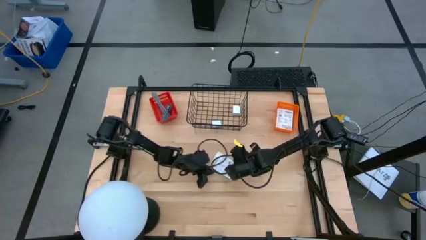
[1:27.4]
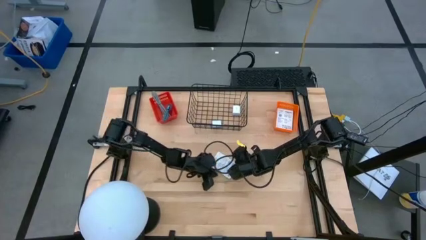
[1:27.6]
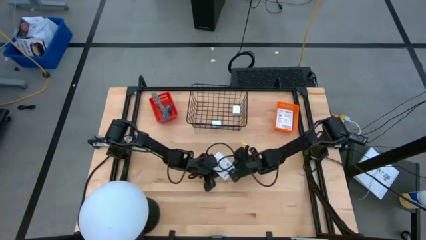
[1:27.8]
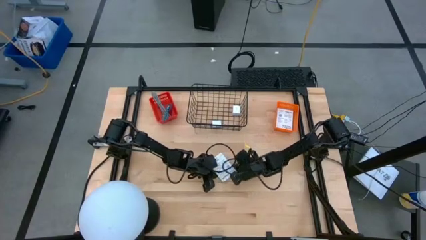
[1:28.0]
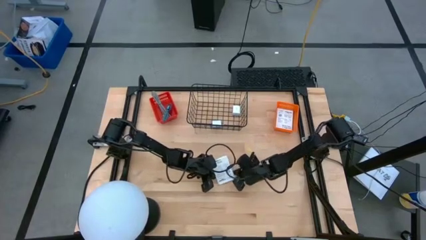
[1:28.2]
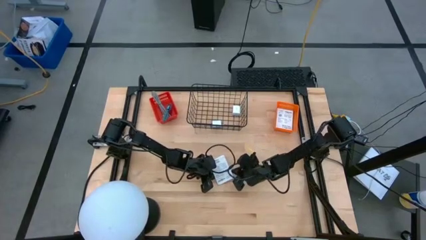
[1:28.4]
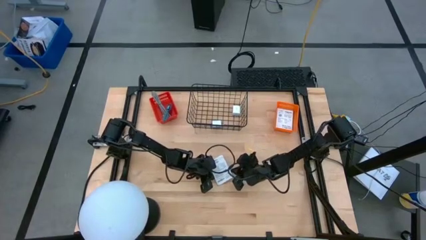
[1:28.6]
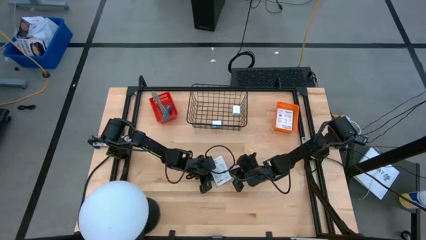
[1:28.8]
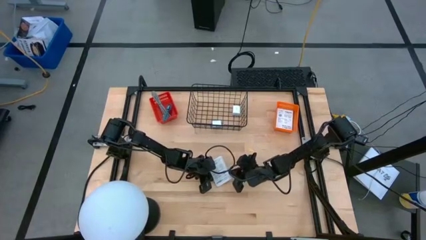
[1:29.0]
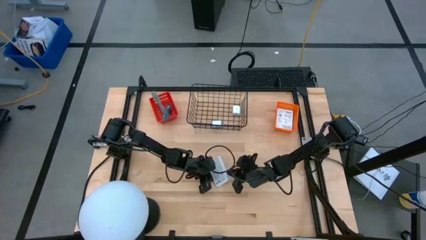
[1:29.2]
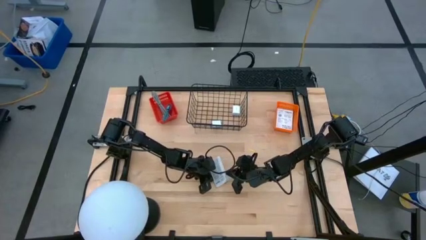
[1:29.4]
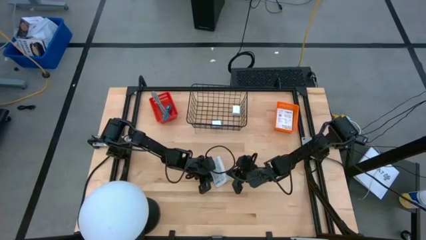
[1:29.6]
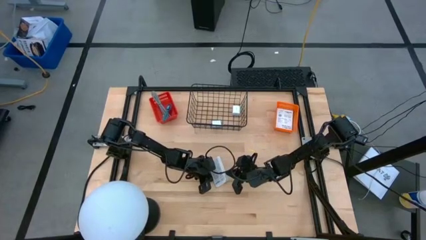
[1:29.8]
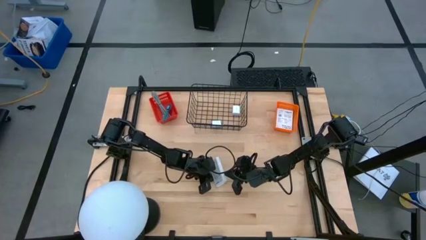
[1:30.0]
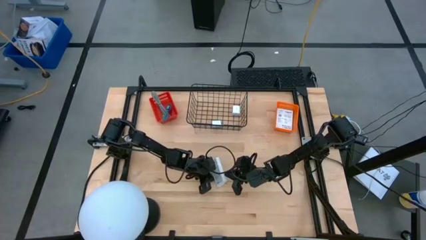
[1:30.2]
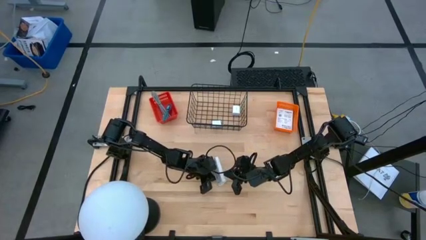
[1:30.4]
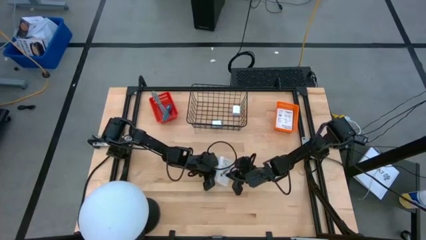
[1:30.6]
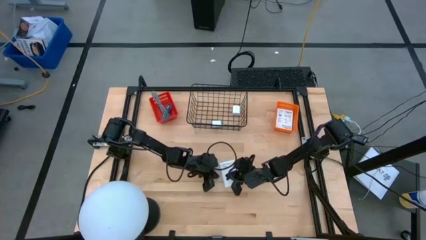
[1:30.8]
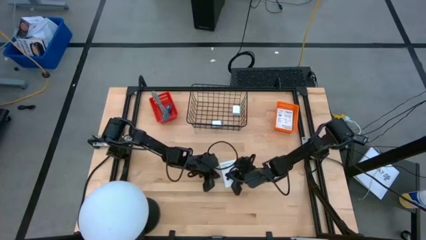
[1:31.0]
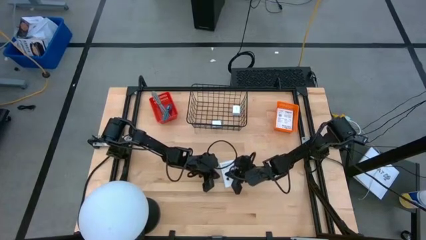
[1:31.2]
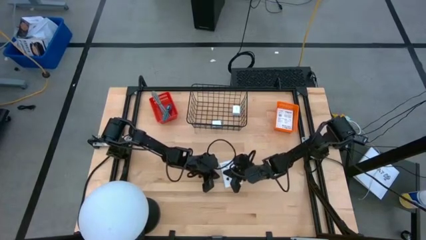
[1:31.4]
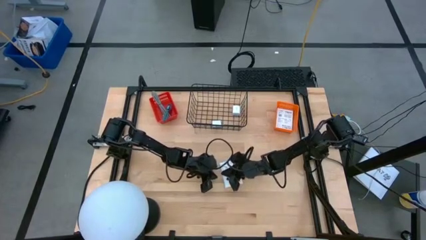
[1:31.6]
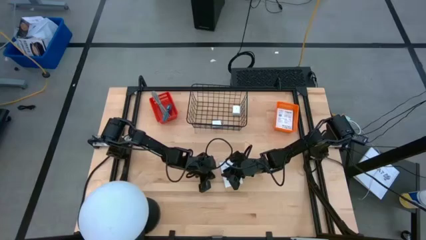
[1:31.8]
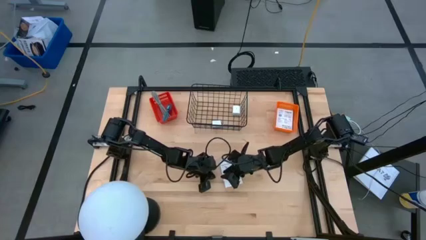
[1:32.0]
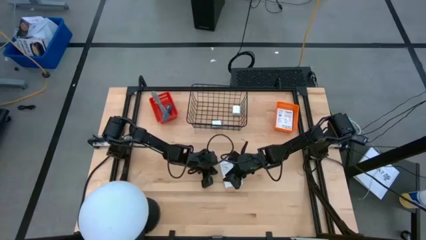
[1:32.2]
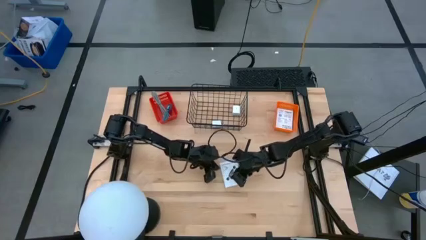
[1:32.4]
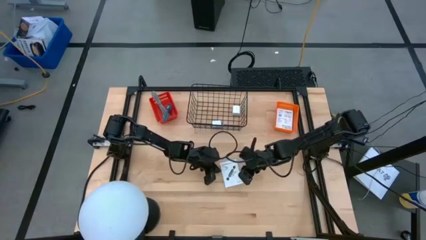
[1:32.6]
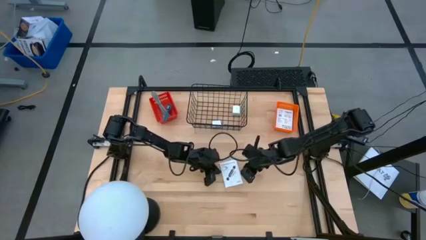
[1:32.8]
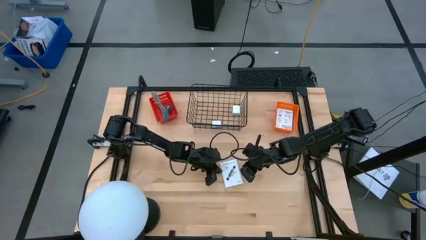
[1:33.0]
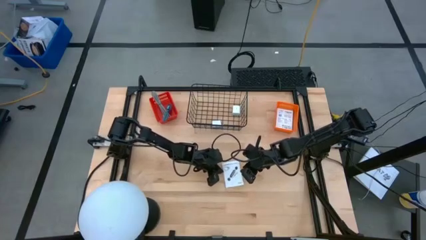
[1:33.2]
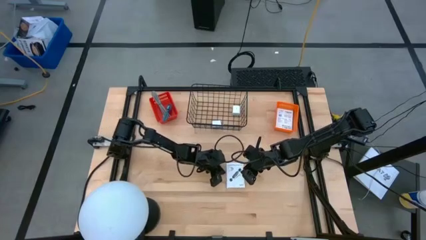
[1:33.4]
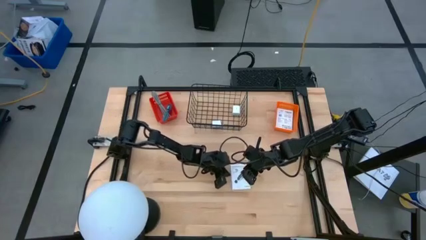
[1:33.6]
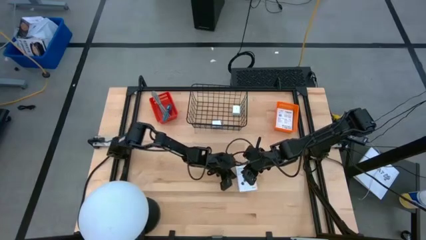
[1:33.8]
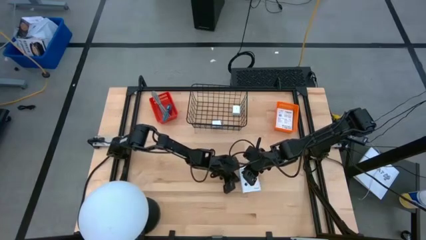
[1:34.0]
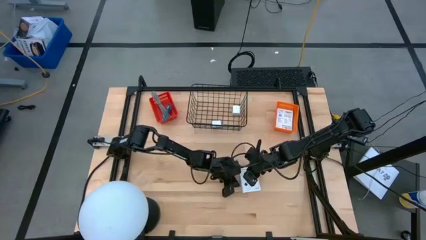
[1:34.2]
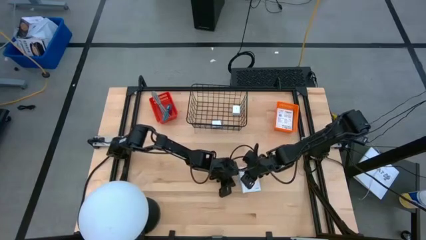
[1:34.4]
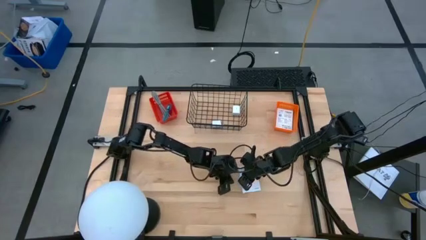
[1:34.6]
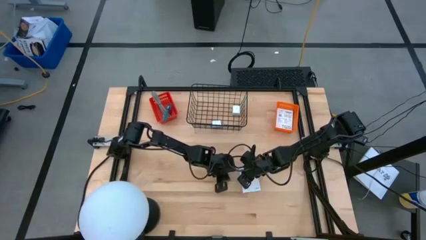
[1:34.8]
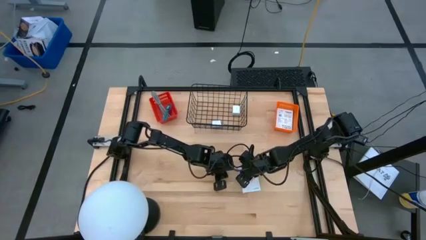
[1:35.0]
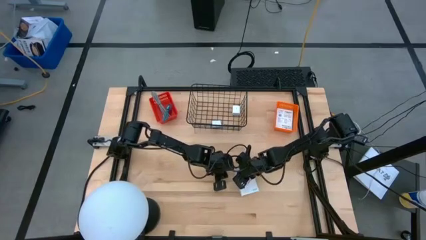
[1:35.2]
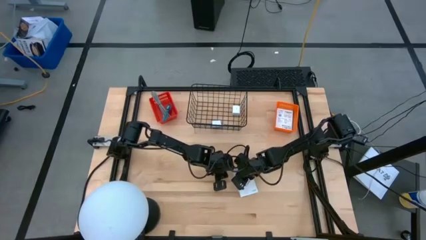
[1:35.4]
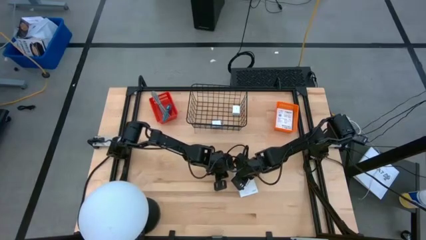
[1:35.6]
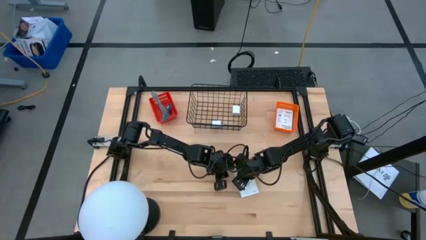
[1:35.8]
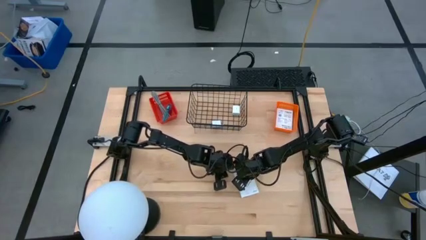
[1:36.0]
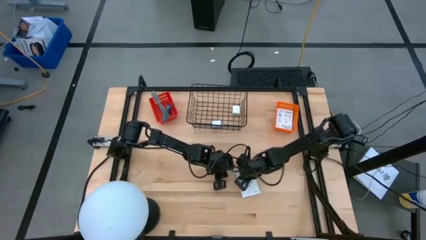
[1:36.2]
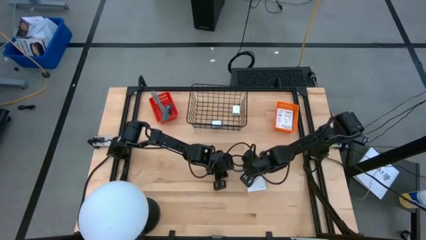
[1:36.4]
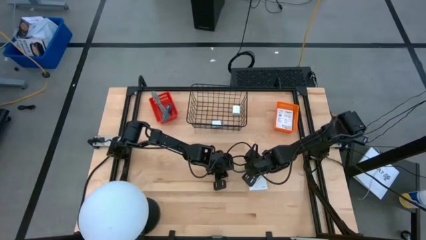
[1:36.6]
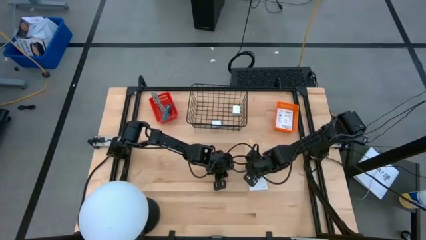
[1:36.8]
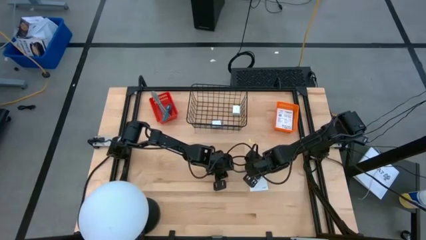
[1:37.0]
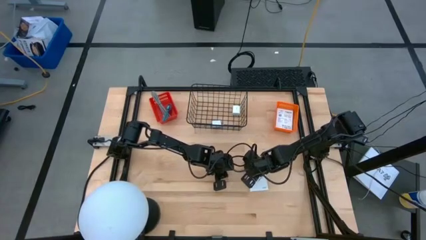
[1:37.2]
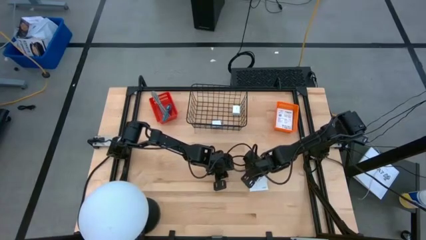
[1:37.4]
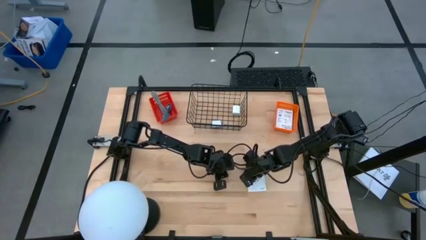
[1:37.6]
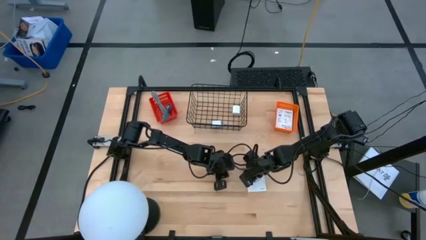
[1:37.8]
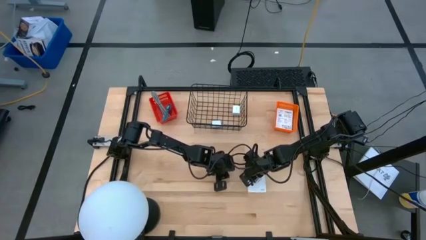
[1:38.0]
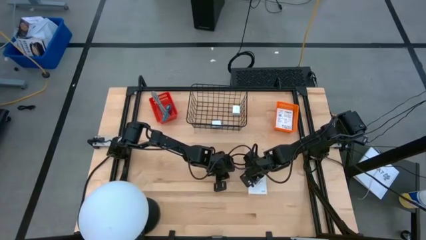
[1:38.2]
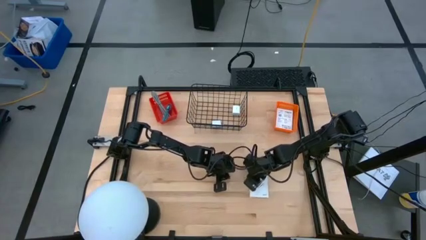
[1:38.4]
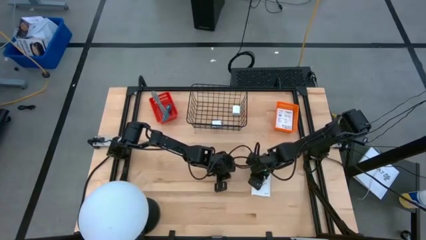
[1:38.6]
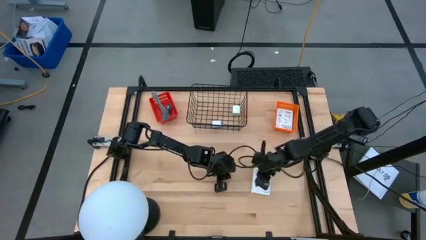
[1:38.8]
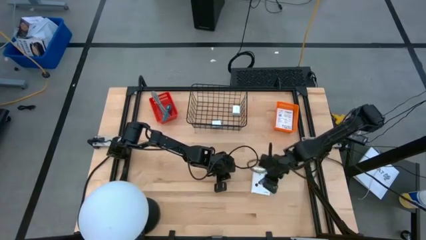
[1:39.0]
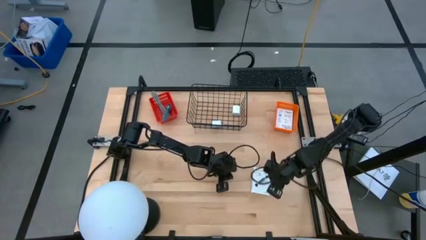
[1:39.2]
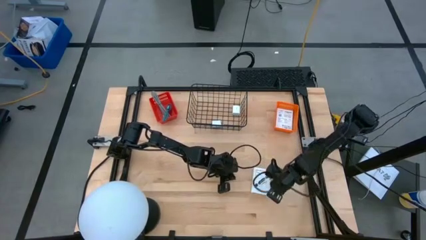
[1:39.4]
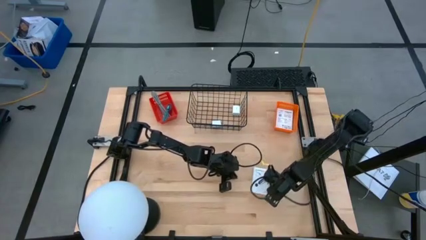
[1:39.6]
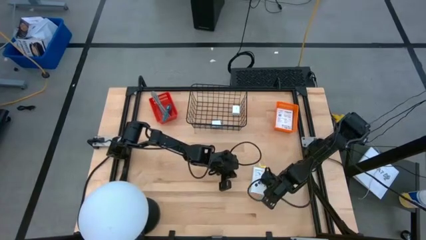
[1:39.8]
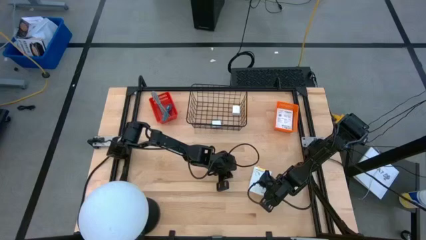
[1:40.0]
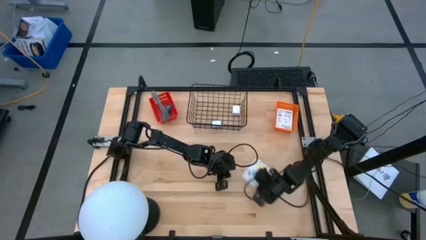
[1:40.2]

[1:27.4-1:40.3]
Task: Pick and place items into bin
Put the card reader box into the orange bin
